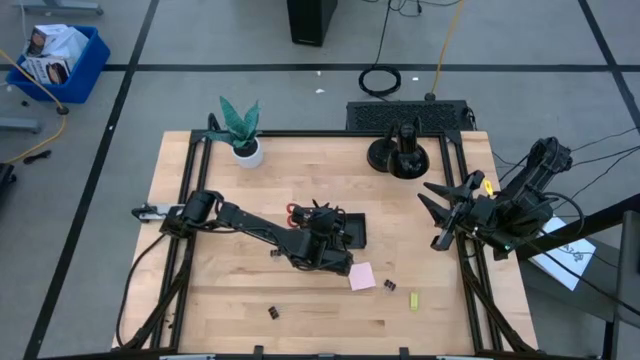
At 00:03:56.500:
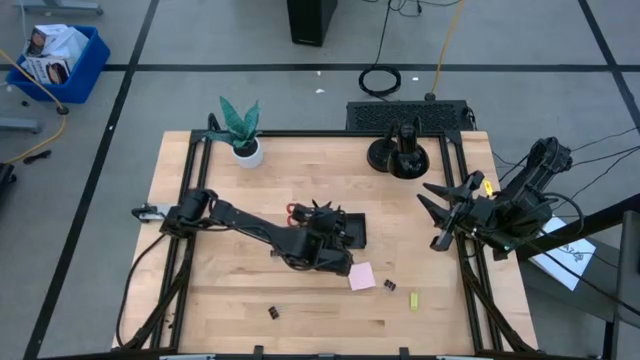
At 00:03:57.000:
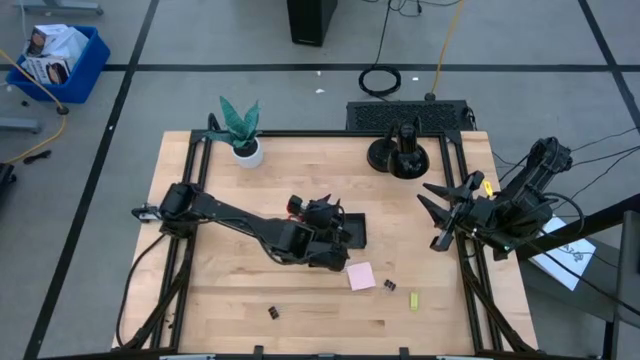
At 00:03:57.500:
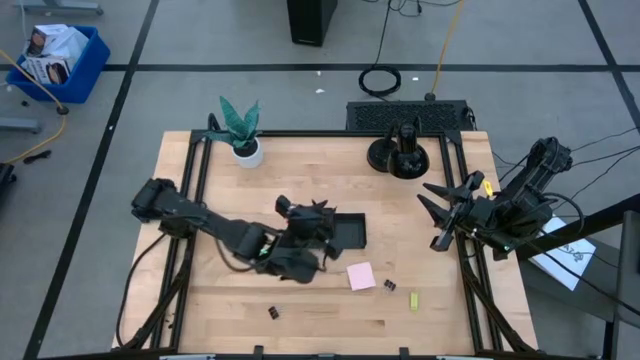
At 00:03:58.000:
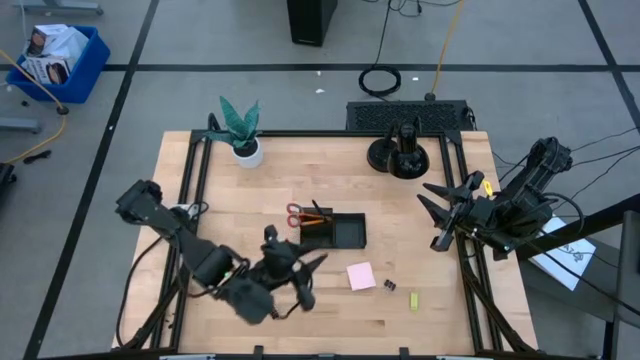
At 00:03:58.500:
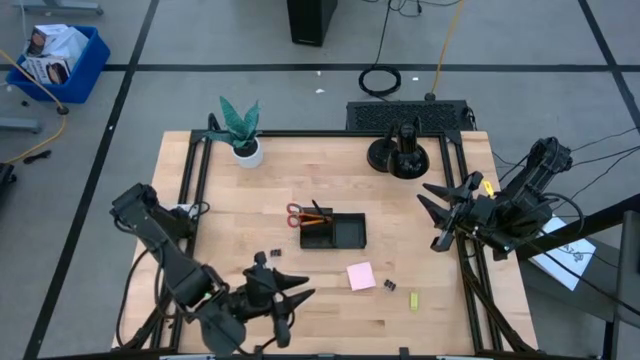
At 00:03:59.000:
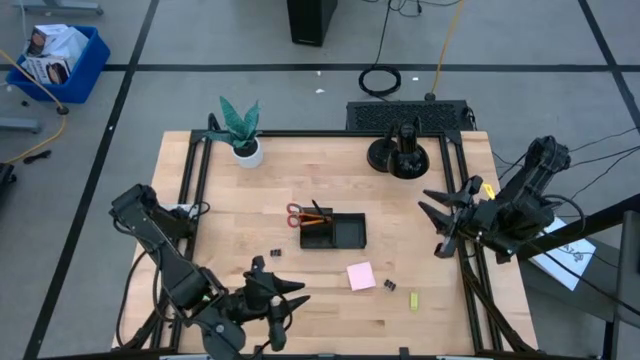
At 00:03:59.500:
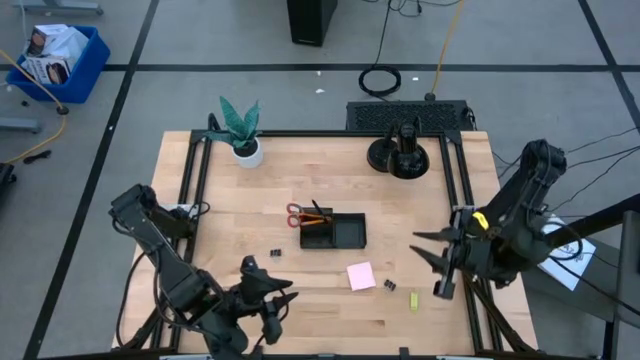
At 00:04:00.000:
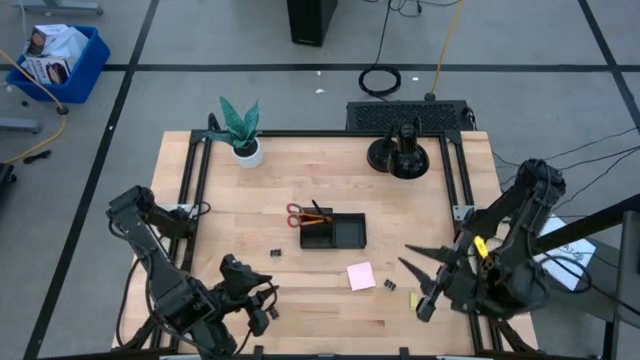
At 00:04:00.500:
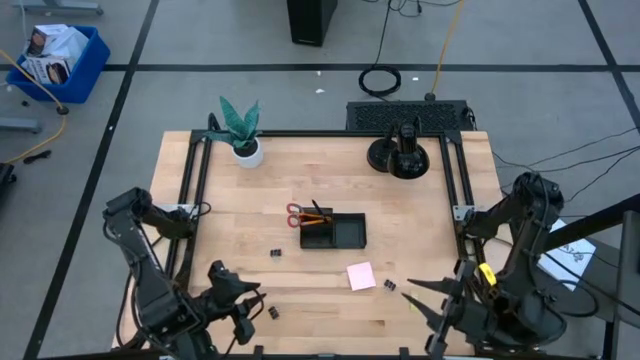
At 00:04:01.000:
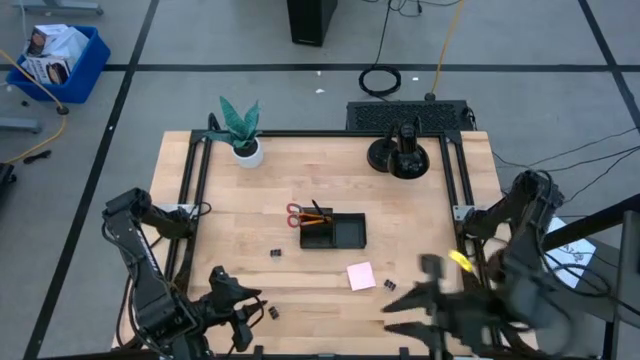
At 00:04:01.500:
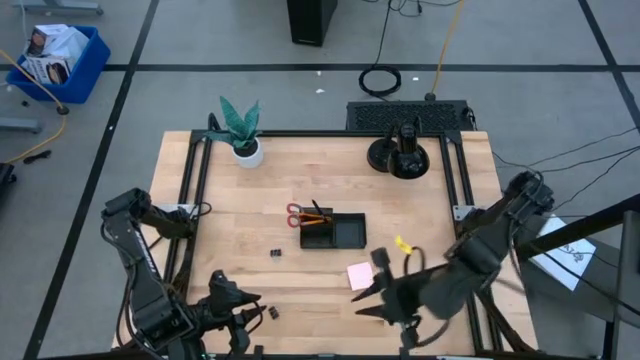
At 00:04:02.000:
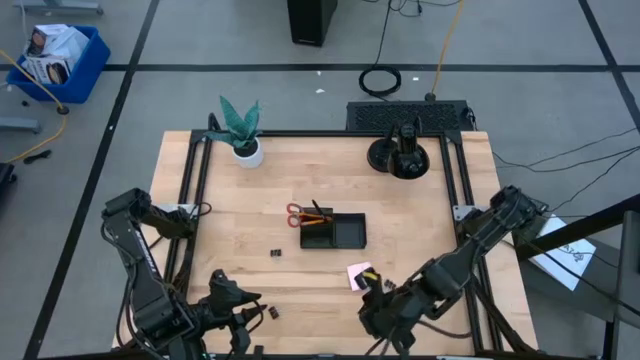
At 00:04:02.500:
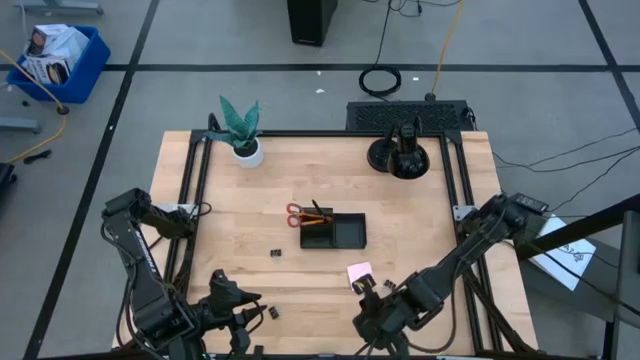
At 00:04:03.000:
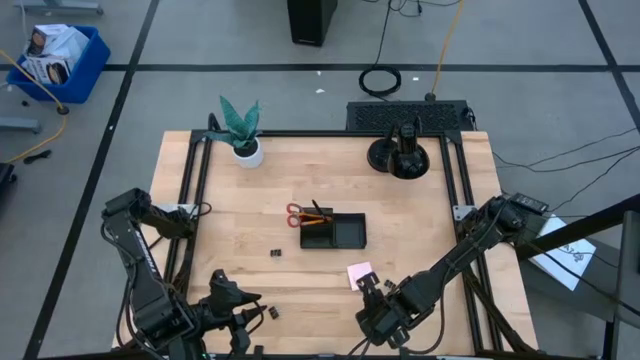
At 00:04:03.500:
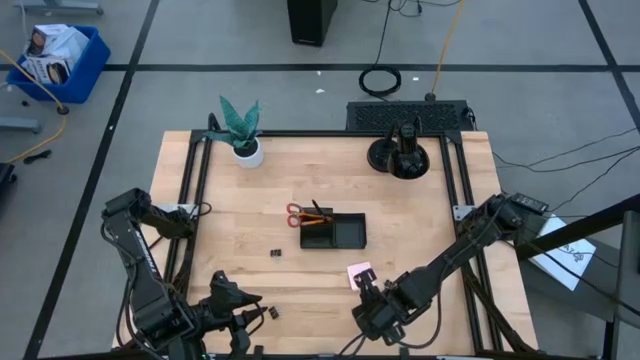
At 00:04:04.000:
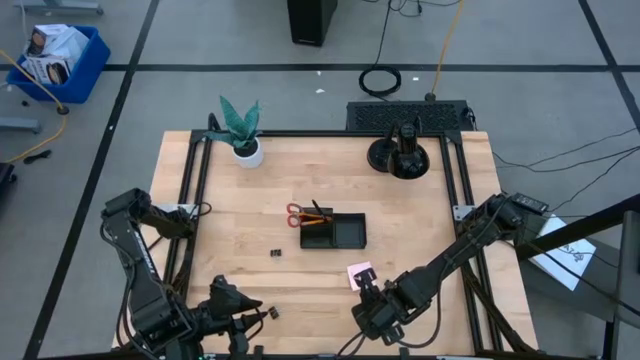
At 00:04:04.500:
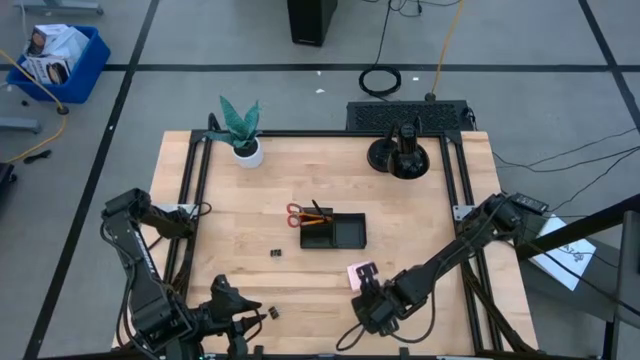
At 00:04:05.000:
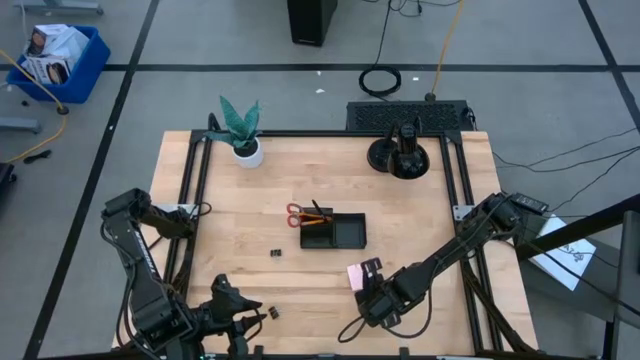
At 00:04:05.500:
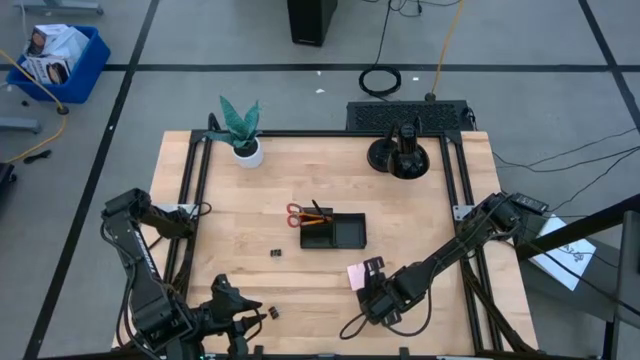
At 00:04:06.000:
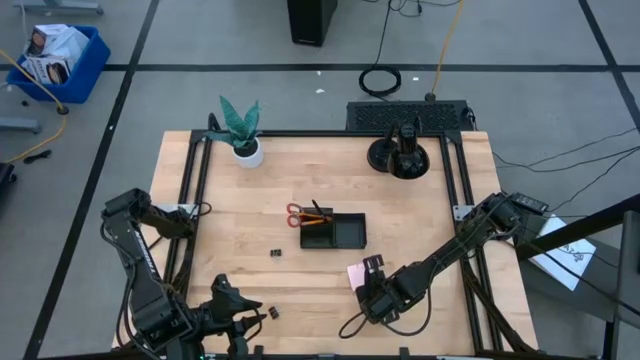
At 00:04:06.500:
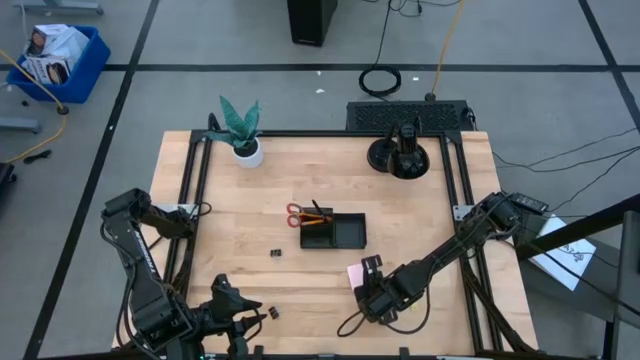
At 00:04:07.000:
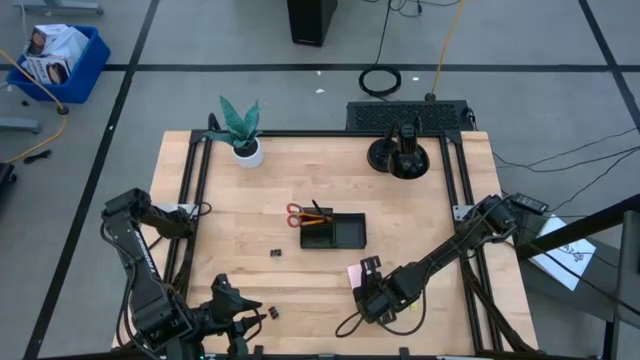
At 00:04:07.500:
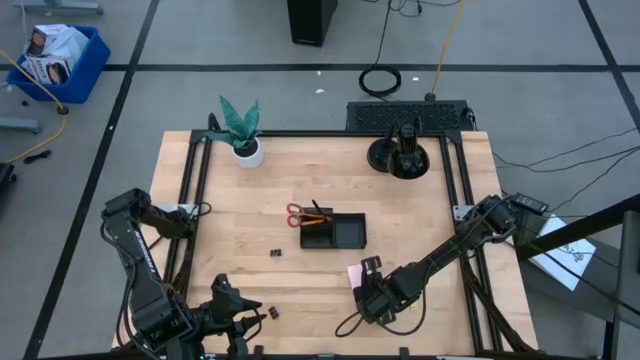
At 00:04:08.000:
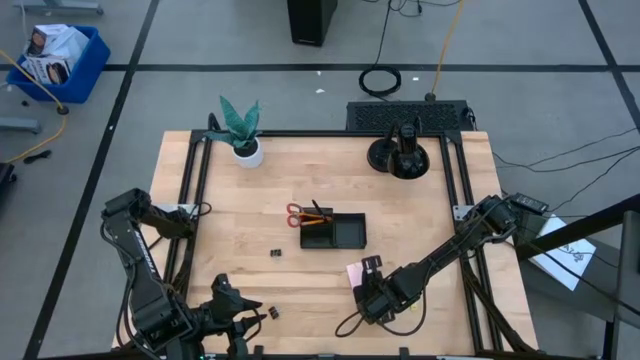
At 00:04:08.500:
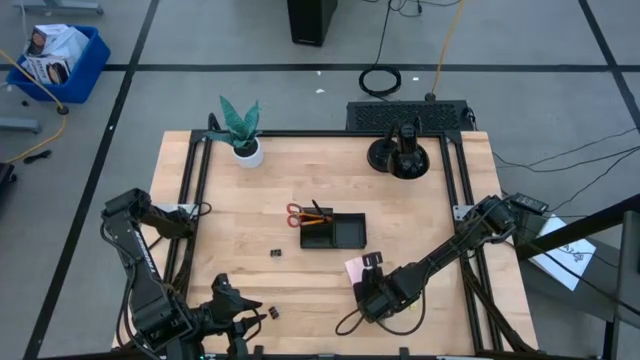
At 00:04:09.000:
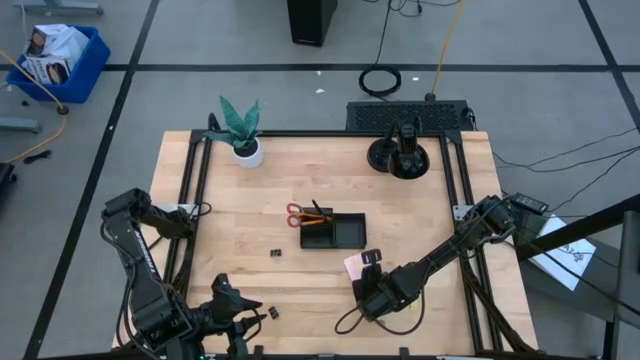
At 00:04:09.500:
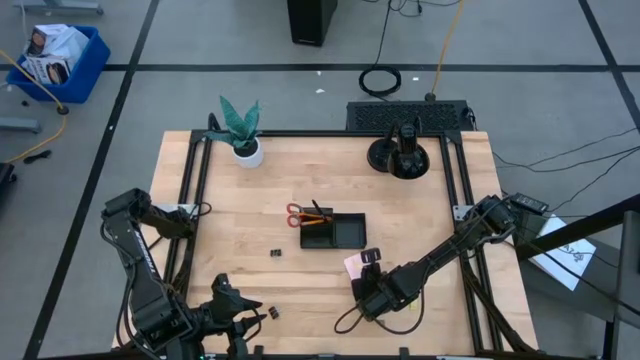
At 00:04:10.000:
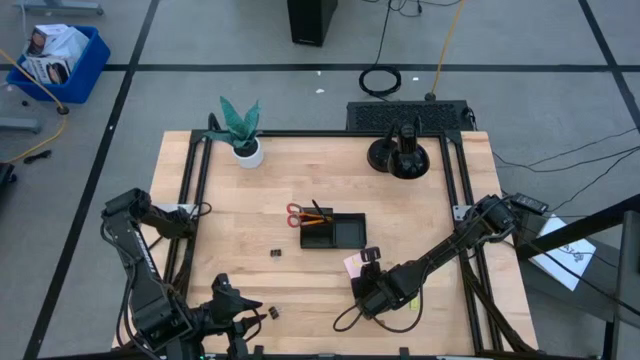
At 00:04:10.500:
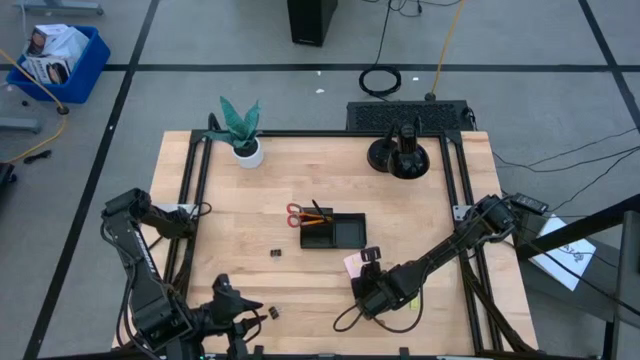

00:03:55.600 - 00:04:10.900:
Task: Pick and place office supplies into organizer
Put the pink sticky notes into the desk organizer

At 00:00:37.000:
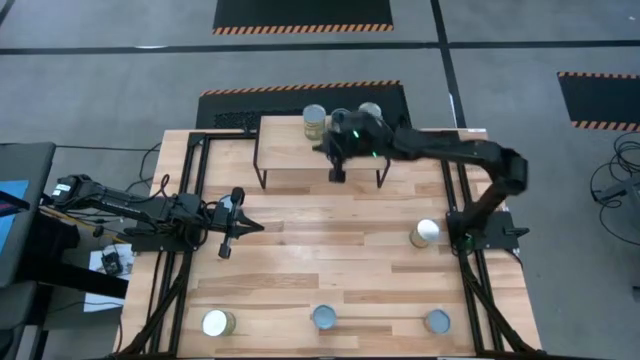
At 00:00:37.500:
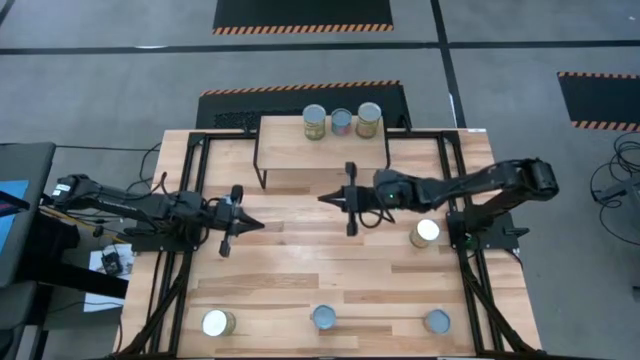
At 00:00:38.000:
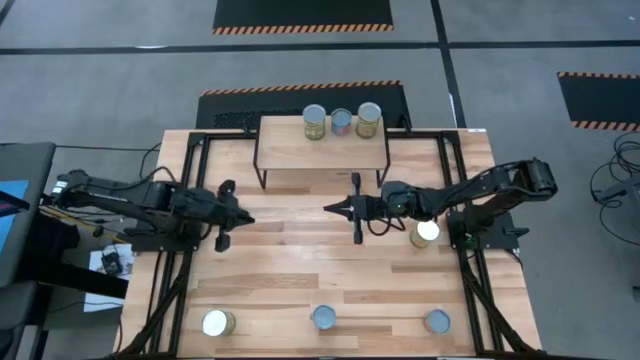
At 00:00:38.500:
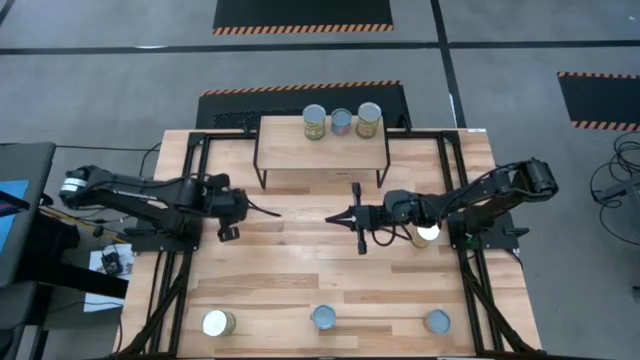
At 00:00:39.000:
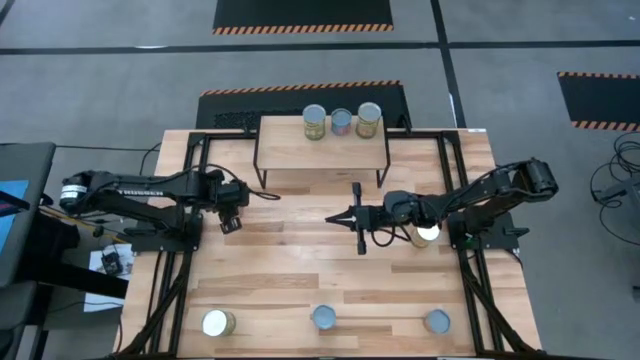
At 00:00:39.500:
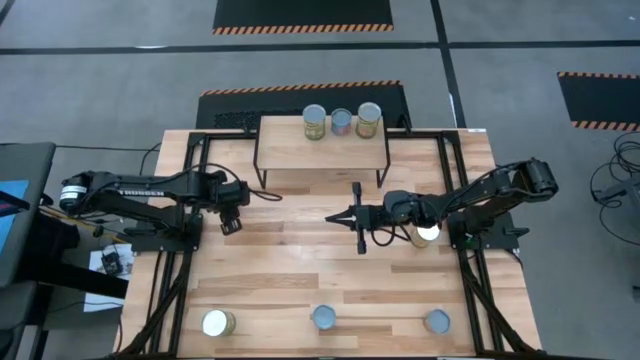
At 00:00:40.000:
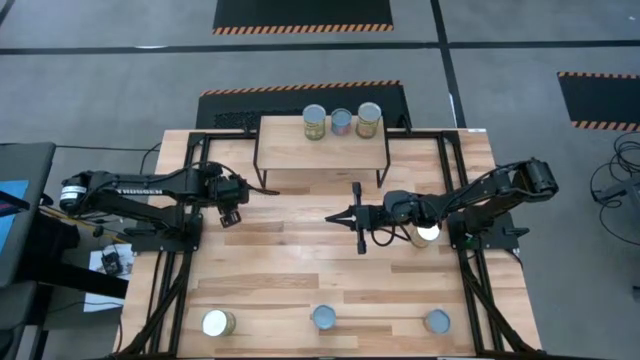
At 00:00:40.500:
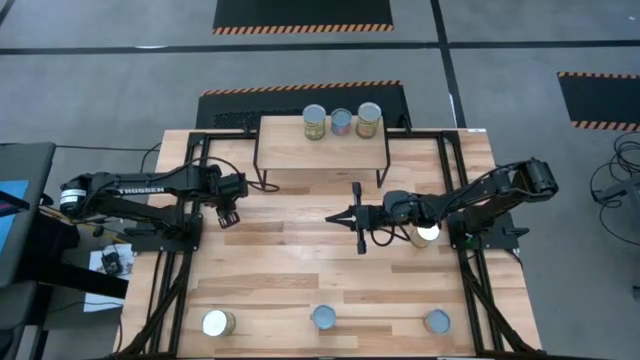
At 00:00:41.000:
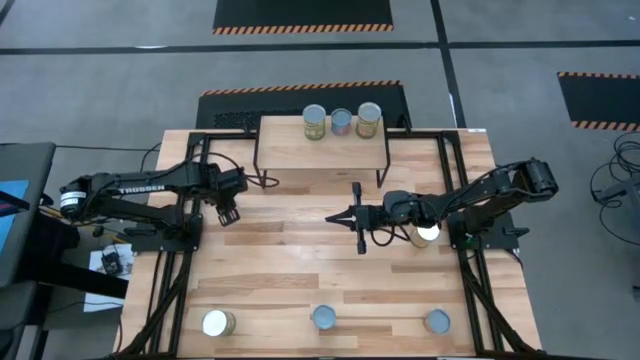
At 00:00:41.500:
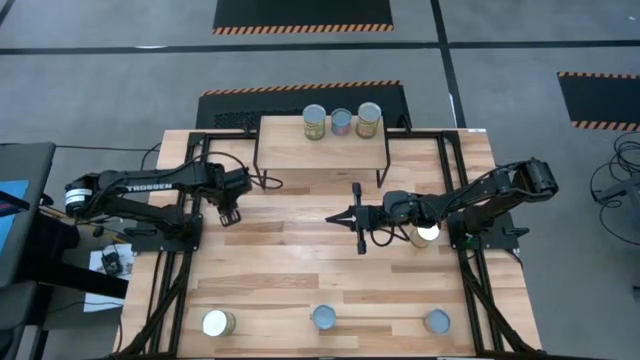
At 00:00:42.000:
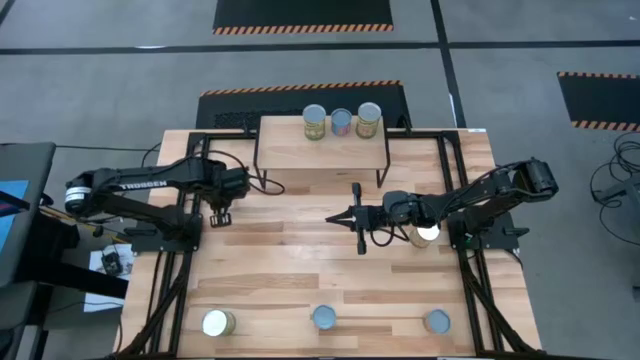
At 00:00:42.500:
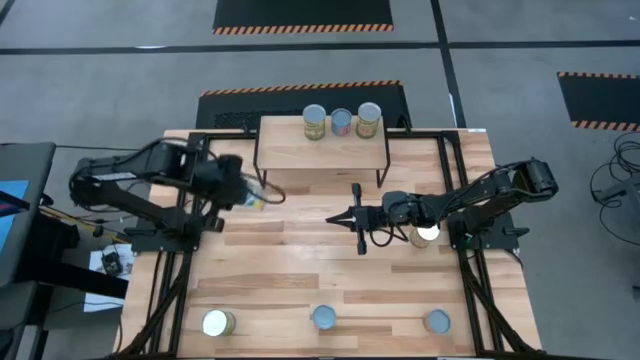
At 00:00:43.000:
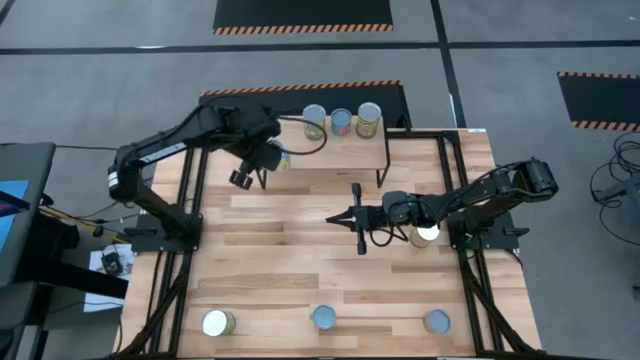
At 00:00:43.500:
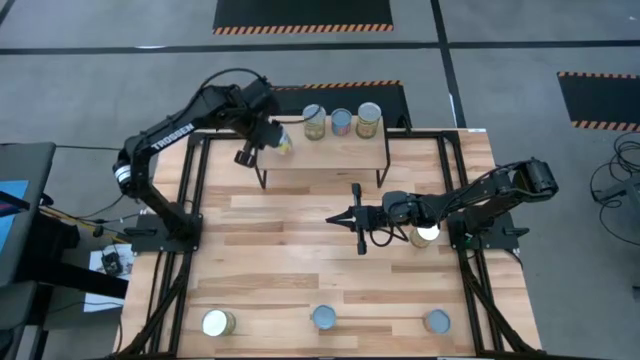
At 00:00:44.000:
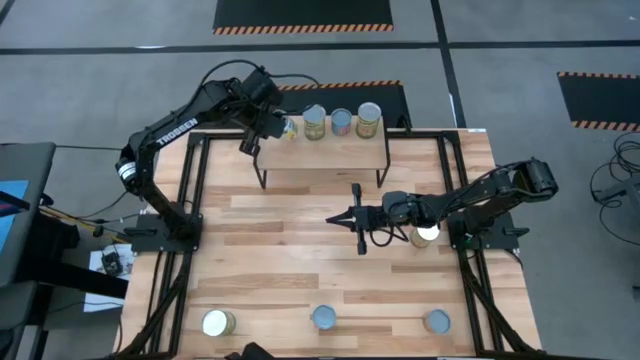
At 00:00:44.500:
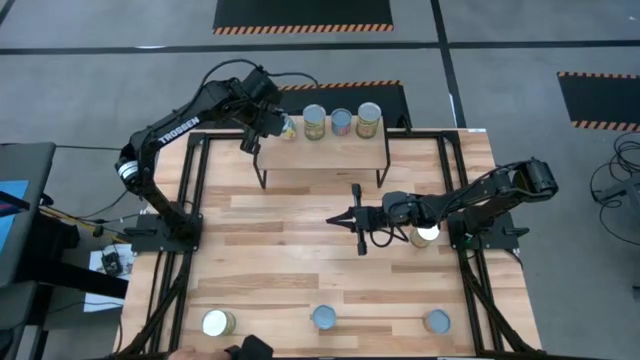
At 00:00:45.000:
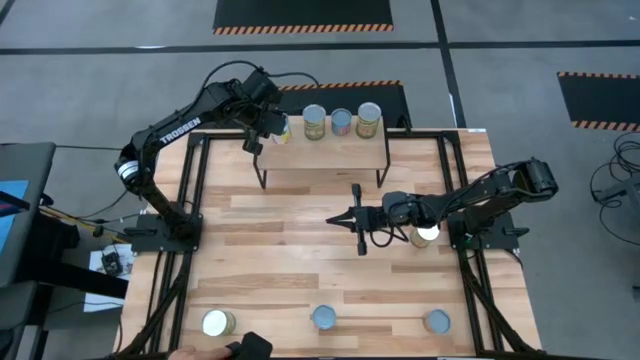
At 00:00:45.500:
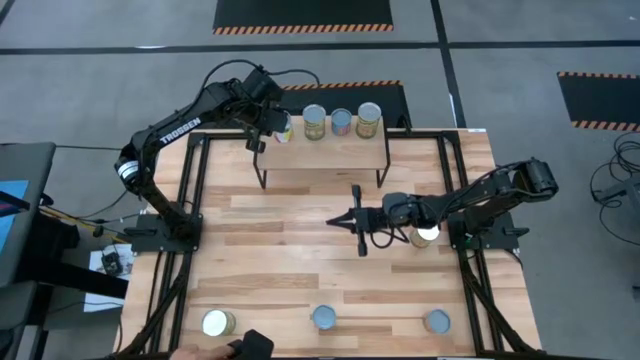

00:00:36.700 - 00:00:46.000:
Task: Pick and place cans onto a shelf
Put the top left pink small can on the shelf
